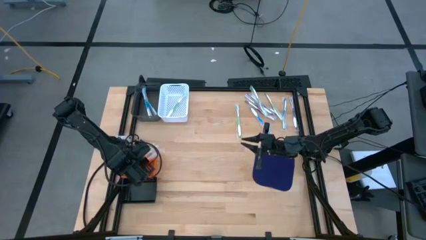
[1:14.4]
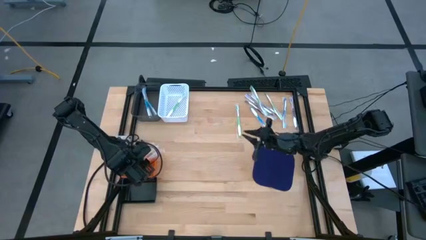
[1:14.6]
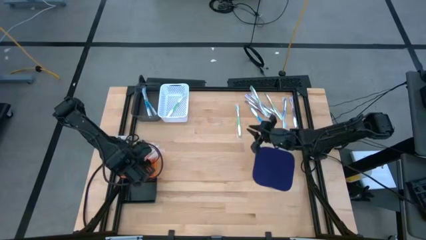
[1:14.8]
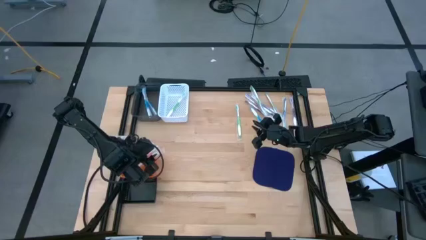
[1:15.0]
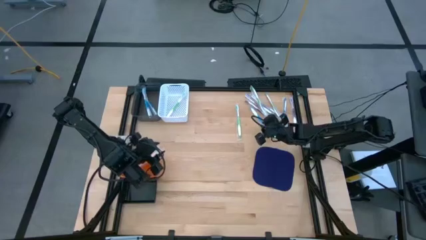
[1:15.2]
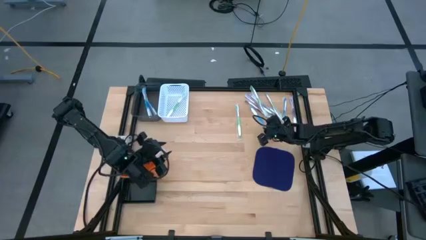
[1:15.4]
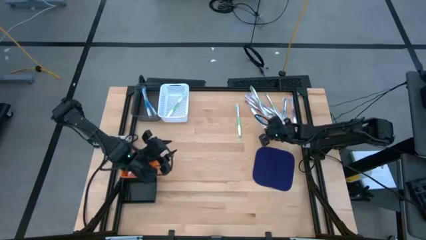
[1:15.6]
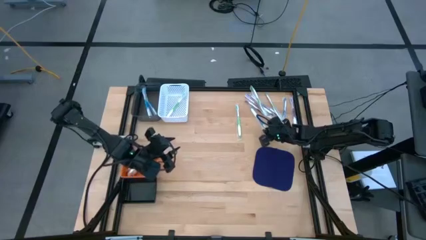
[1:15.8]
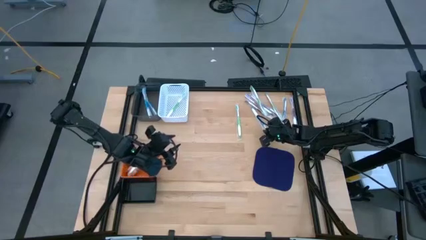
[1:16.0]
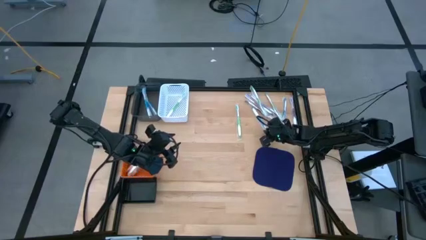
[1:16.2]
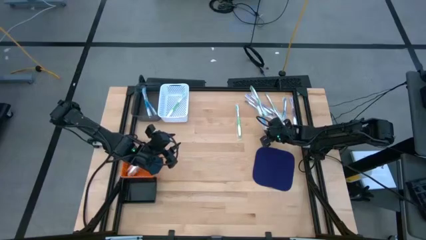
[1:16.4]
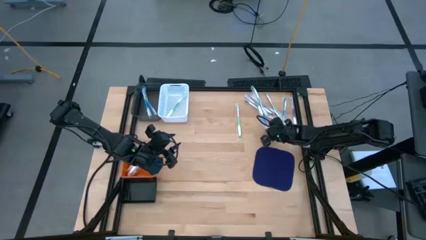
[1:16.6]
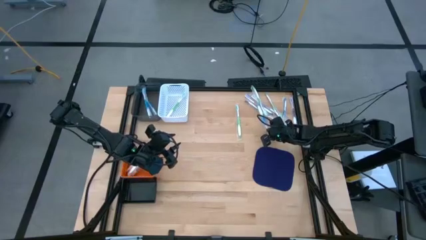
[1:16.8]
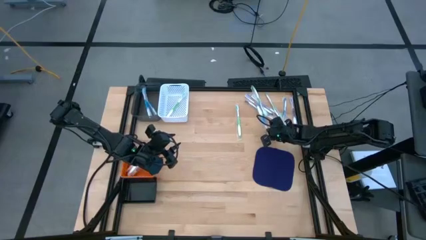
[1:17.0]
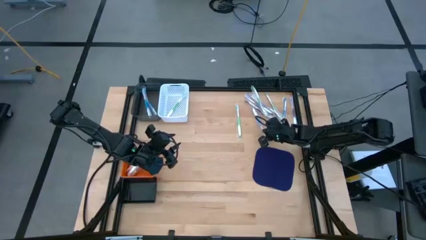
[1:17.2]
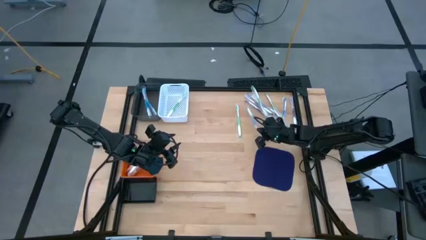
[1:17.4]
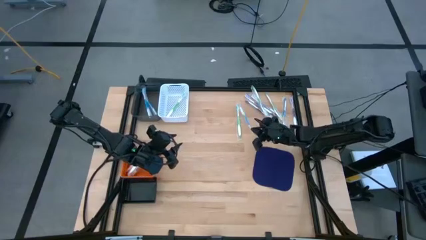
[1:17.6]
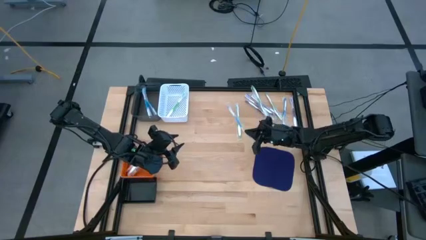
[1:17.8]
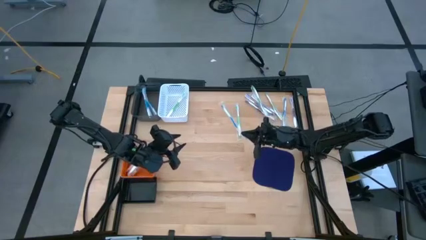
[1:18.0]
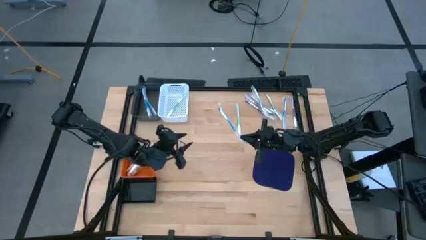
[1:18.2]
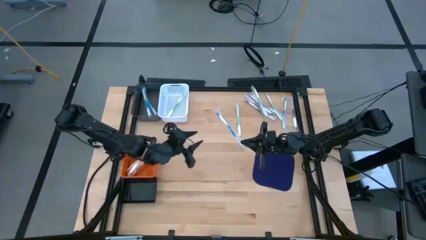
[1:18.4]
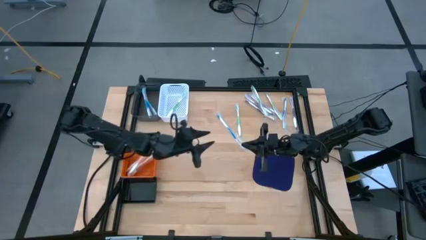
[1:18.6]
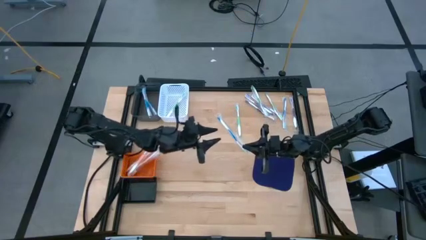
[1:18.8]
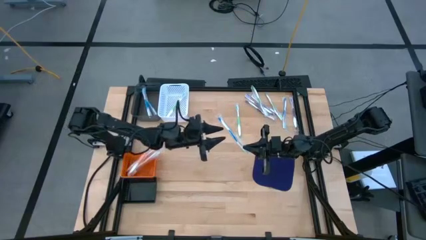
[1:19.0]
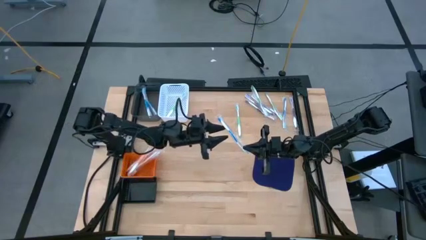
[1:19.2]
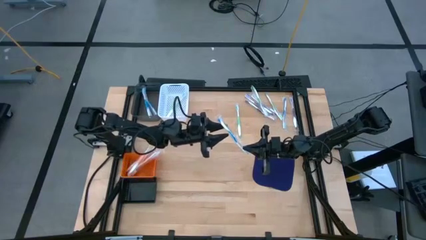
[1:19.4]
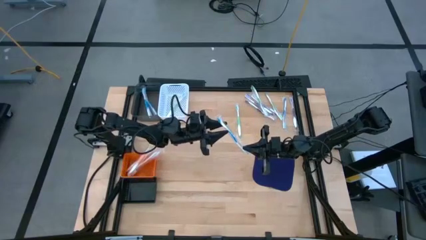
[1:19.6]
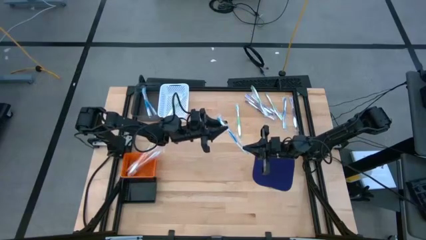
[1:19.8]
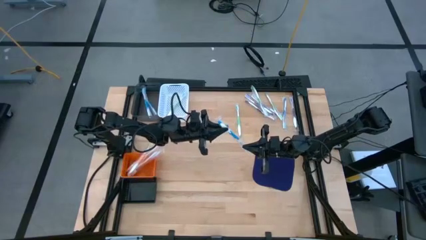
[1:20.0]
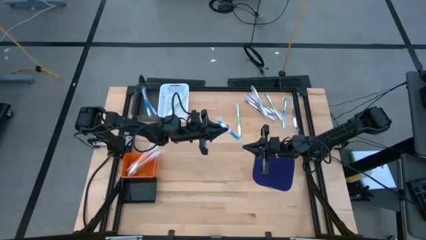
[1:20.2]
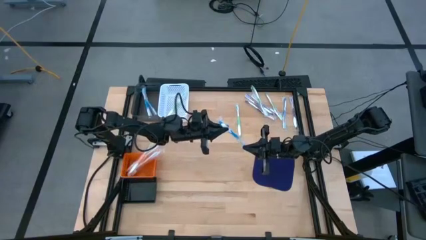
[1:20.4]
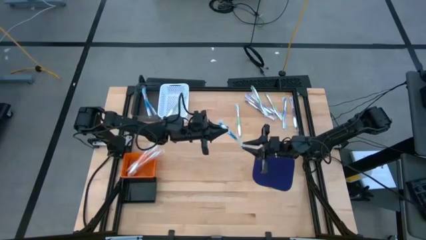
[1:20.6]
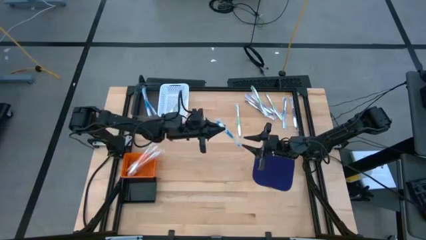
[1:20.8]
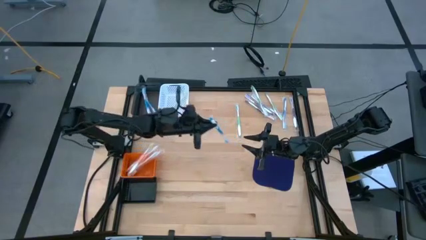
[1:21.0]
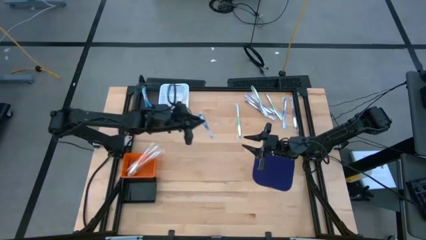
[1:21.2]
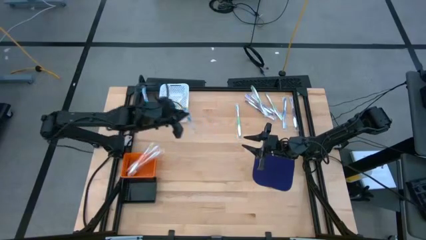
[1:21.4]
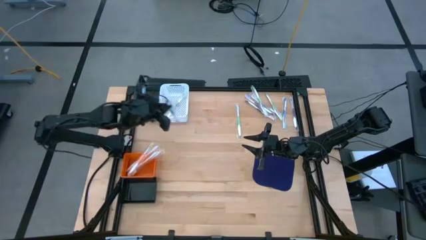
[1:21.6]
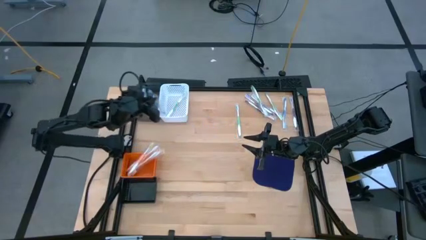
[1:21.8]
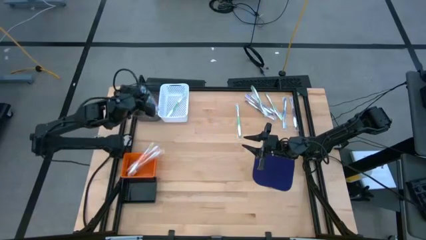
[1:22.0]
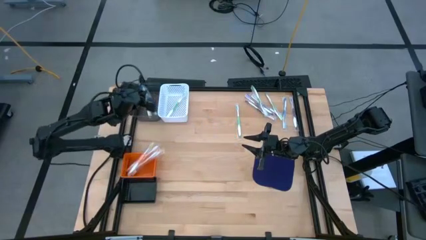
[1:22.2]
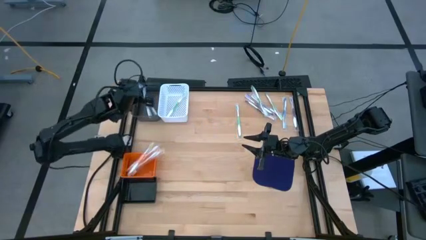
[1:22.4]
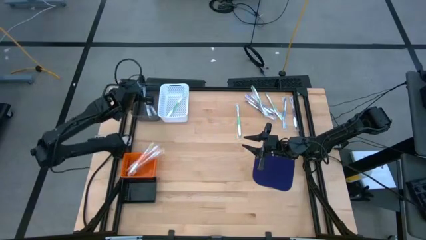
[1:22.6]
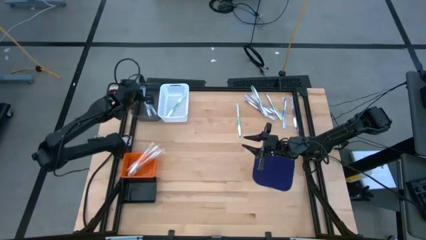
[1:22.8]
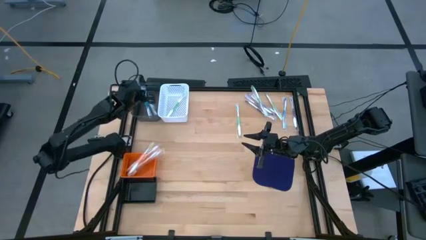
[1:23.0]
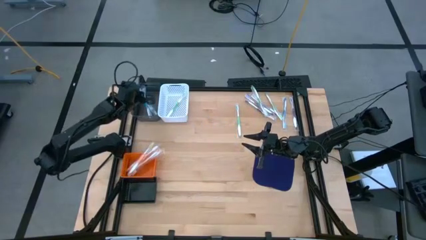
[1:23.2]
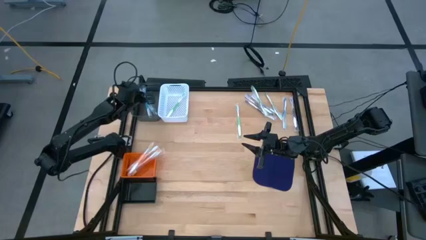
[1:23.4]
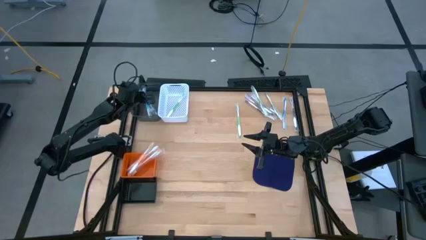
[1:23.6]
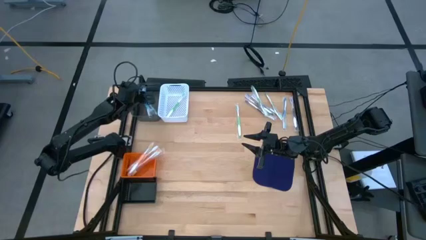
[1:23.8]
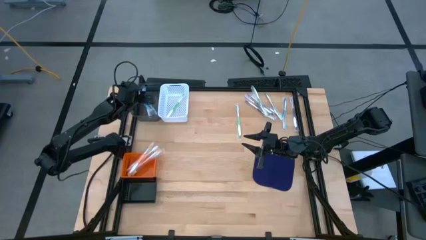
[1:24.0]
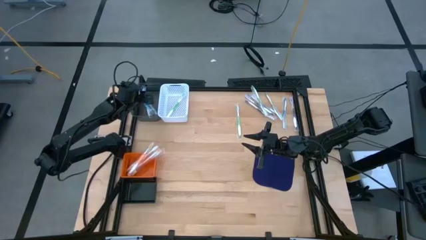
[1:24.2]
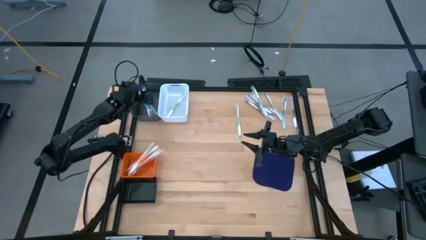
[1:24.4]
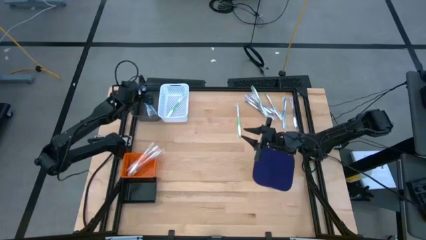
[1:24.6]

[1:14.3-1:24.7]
Task: Pick & Place Toothbrushes
Put the blue toothbrush into the gray bin

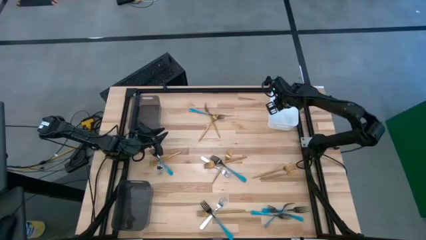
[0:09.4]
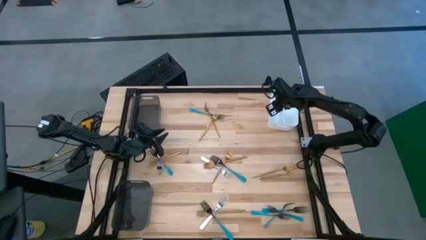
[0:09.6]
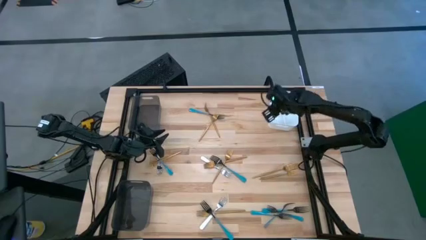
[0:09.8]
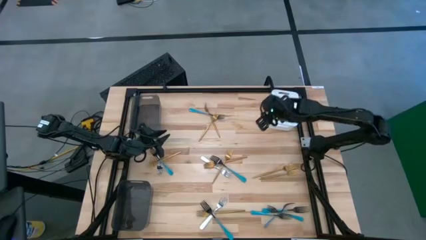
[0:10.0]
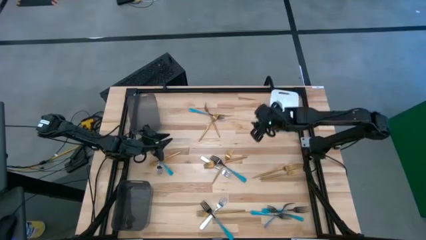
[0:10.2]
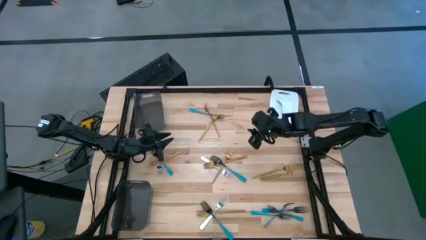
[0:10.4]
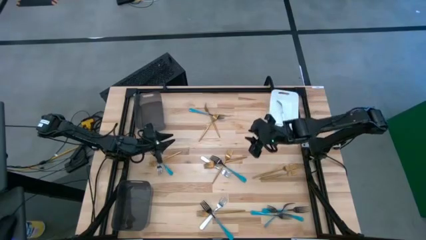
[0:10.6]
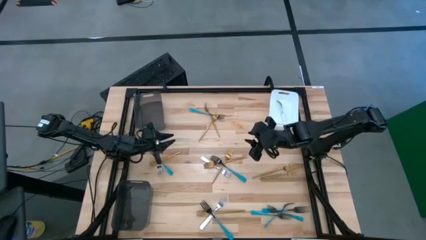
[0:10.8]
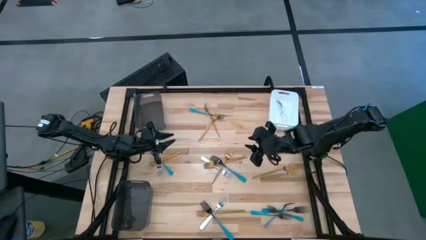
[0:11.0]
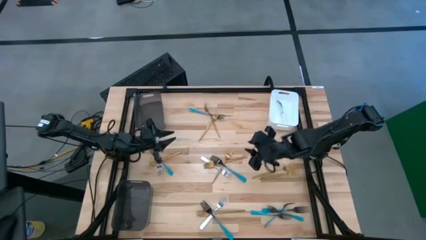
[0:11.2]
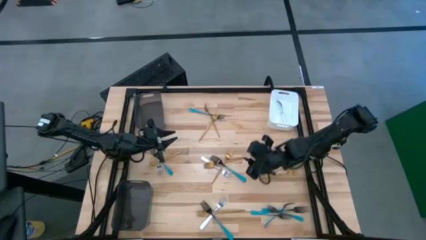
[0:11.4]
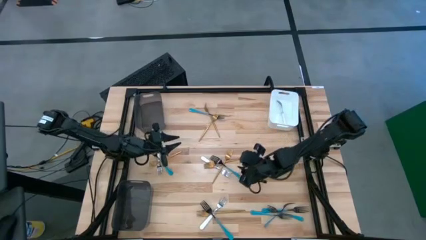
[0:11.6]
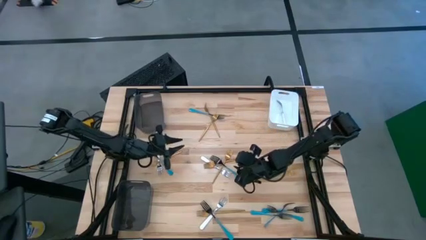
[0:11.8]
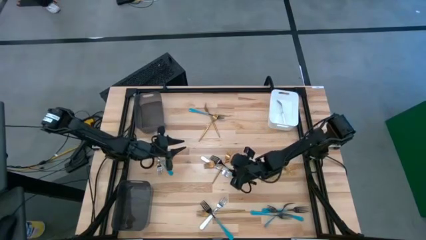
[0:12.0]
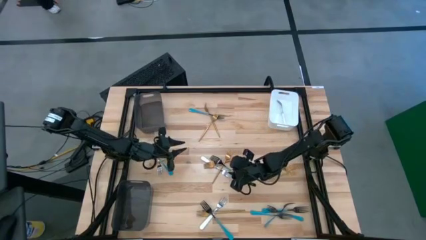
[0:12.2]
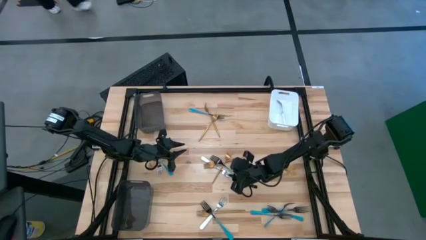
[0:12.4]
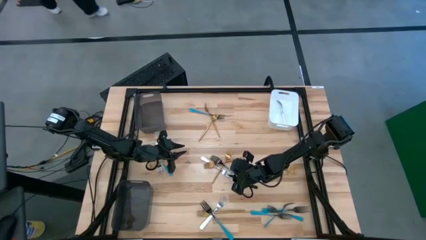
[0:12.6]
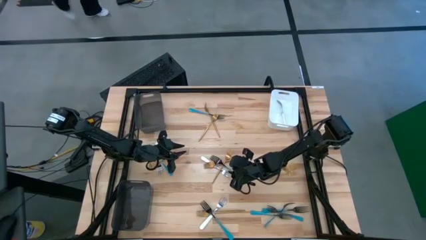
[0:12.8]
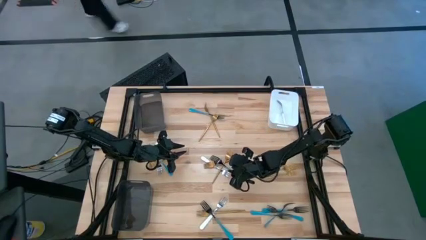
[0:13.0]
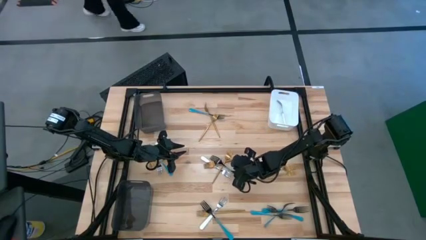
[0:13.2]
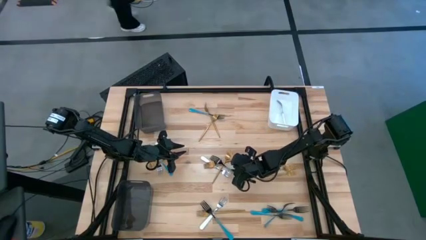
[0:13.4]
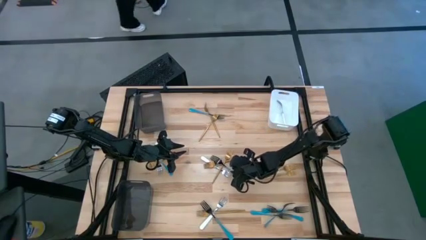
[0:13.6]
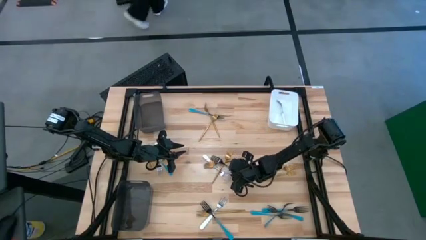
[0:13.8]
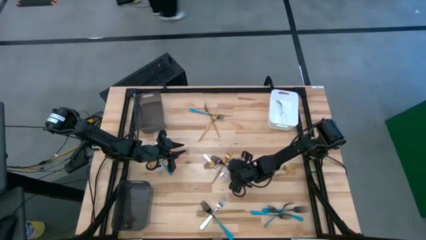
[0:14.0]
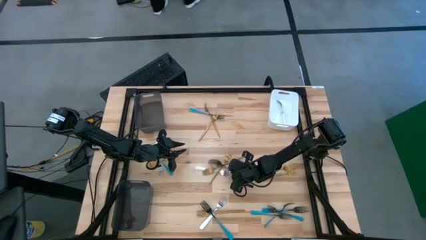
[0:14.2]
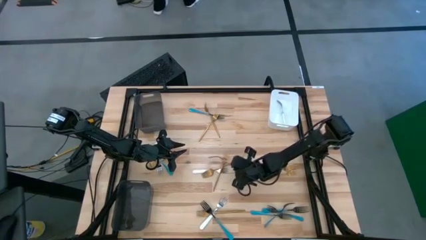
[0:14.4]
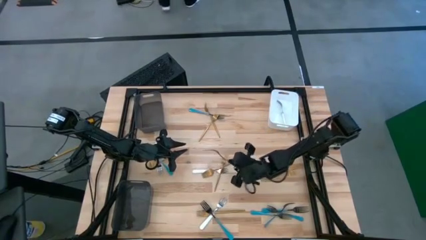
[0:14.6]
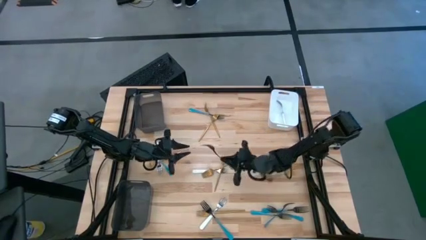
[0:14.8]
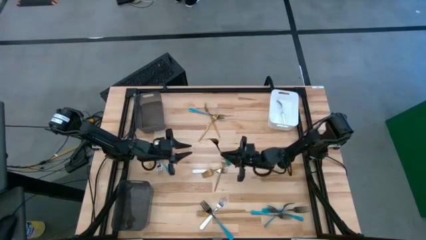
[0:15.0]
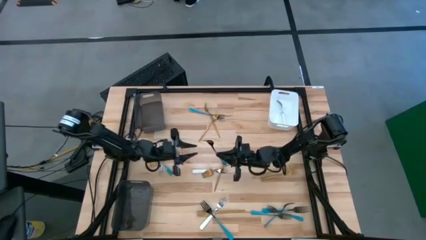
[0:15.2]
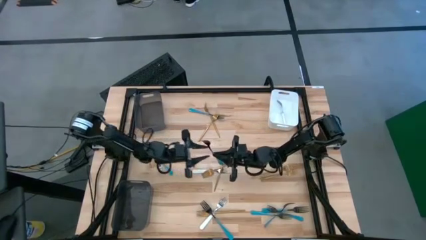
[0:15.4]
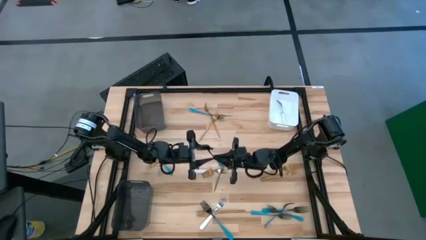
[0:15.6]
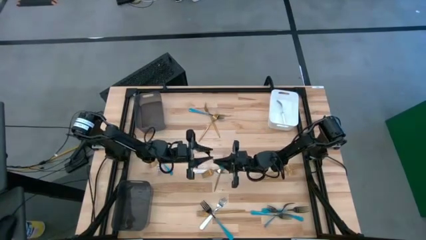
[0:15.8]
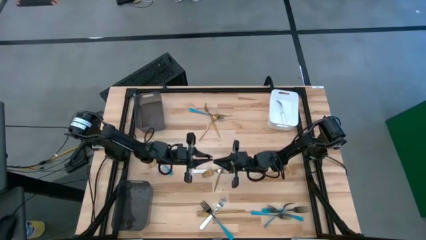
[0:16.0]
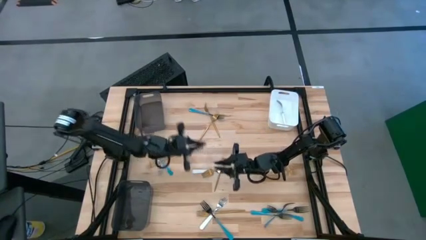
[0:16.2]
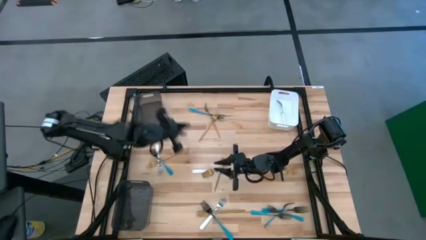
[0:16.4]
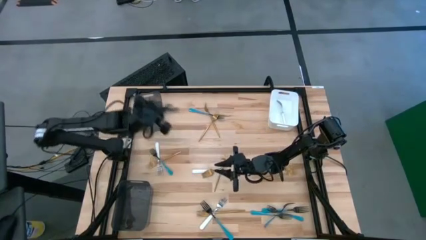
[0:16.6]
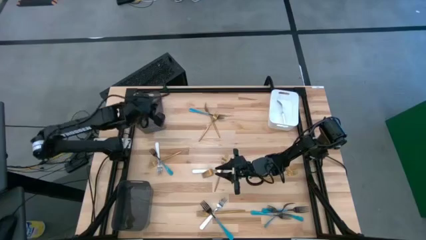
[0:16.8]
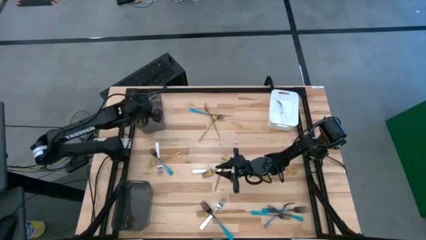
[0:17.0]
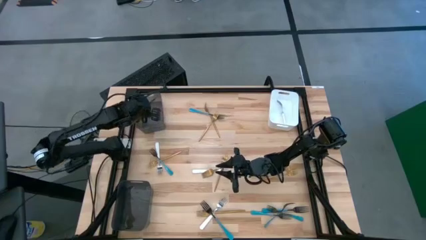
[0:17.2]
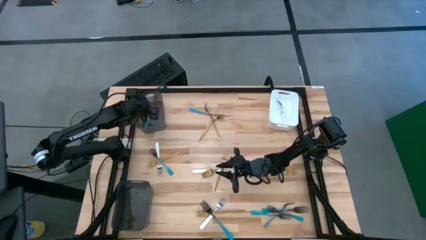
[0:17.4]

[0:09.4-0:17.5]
Task: Sort silverware by color (type)
Put the blue fork into the top black bin
